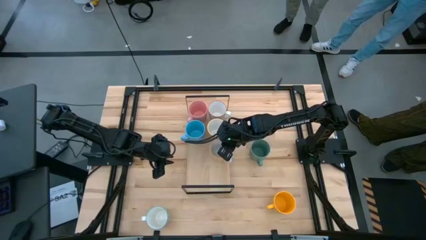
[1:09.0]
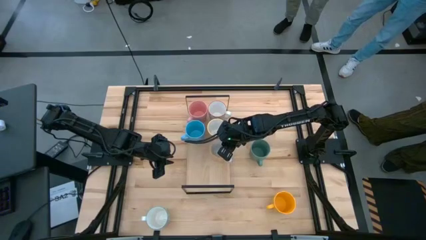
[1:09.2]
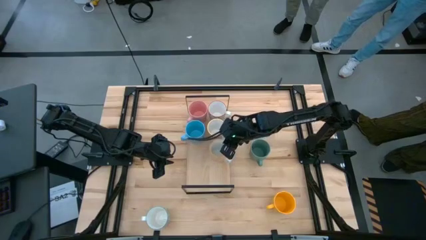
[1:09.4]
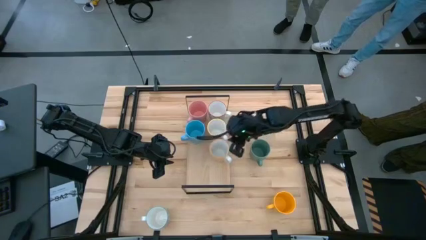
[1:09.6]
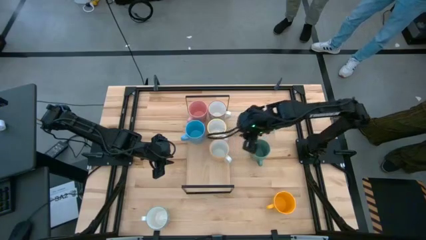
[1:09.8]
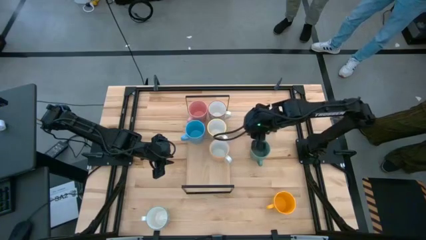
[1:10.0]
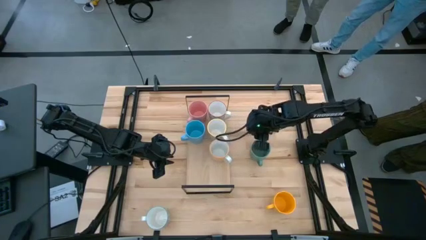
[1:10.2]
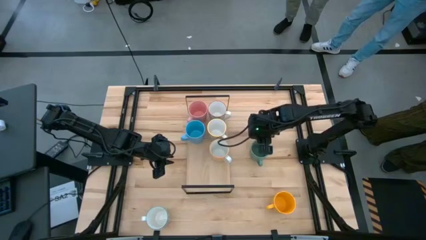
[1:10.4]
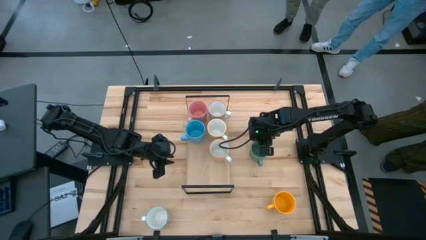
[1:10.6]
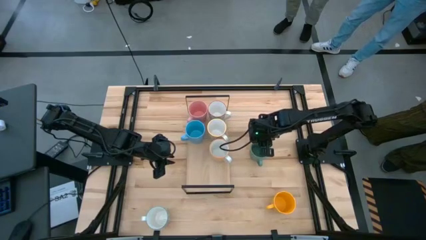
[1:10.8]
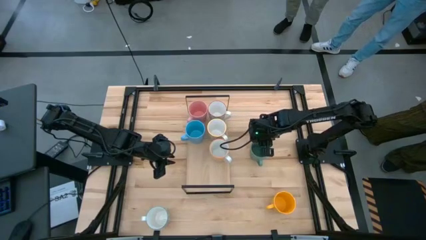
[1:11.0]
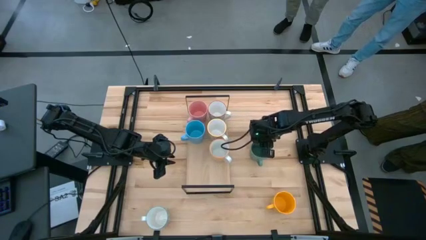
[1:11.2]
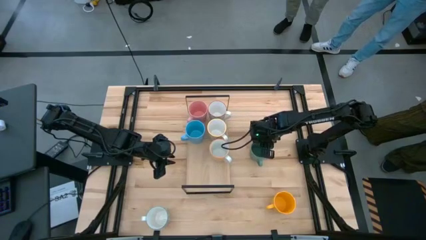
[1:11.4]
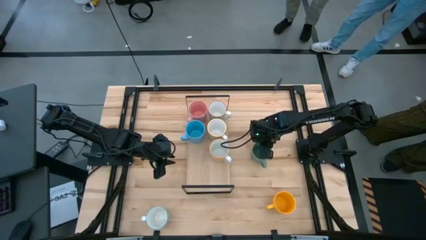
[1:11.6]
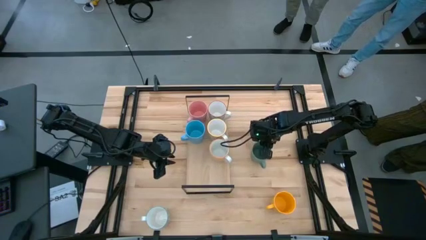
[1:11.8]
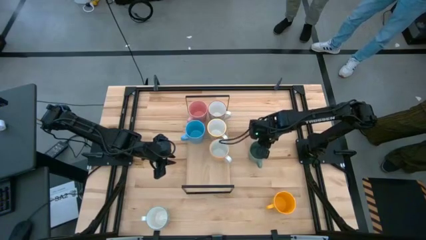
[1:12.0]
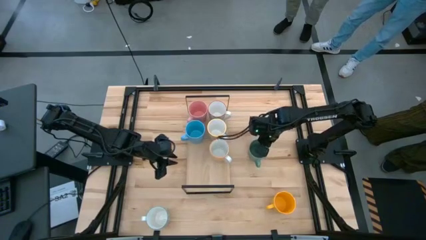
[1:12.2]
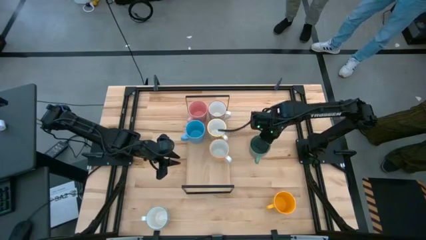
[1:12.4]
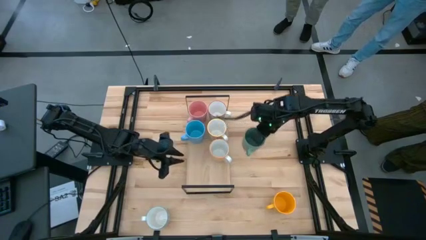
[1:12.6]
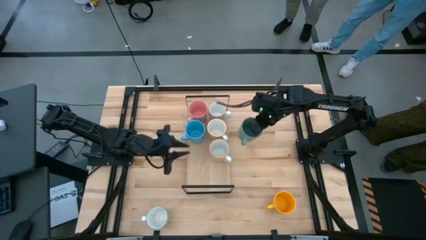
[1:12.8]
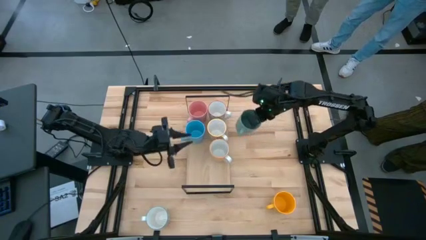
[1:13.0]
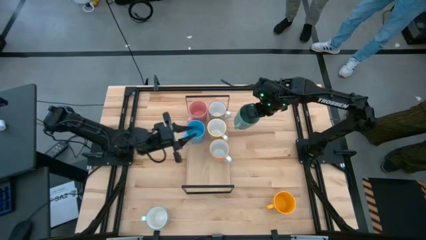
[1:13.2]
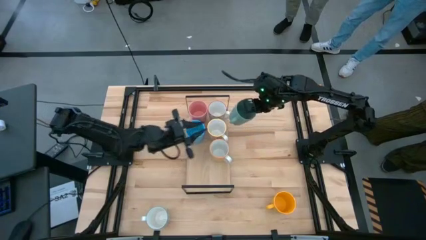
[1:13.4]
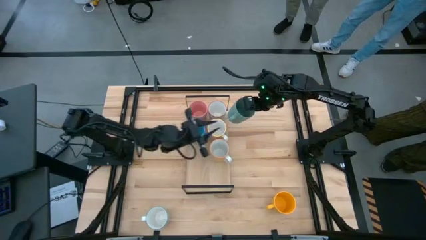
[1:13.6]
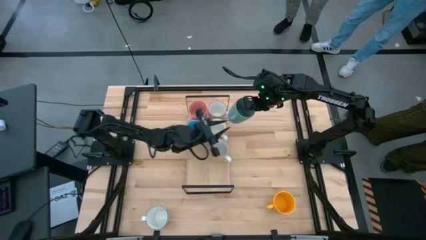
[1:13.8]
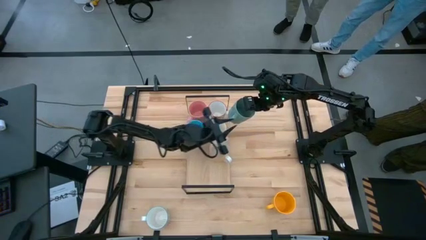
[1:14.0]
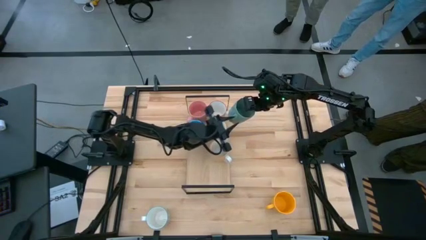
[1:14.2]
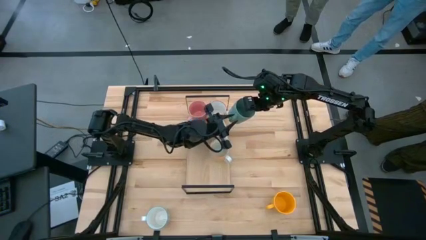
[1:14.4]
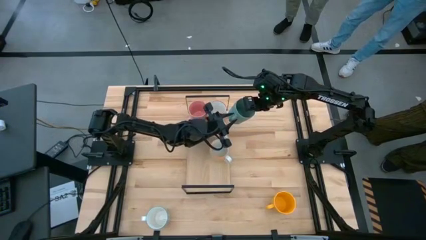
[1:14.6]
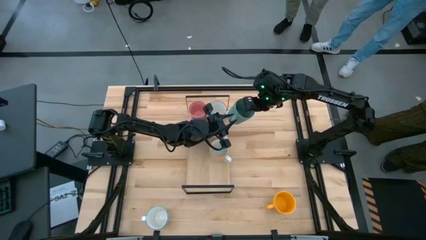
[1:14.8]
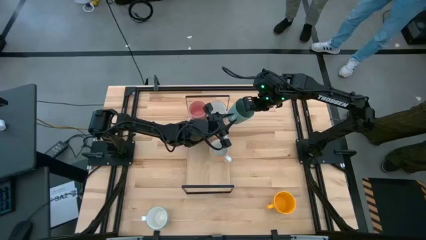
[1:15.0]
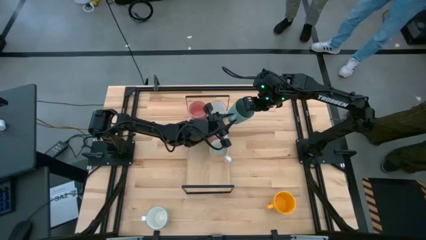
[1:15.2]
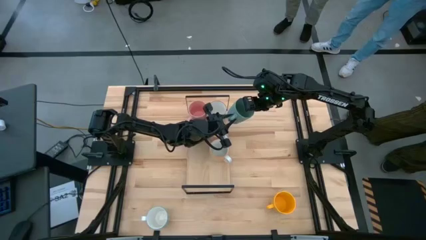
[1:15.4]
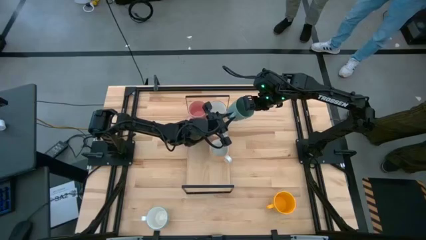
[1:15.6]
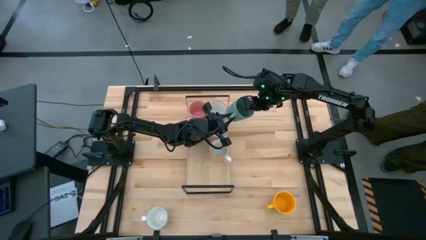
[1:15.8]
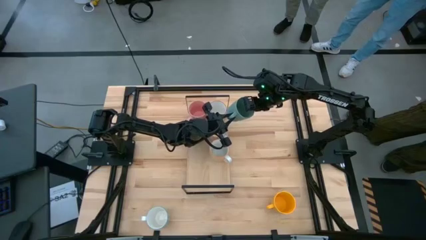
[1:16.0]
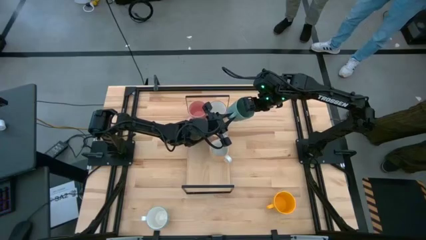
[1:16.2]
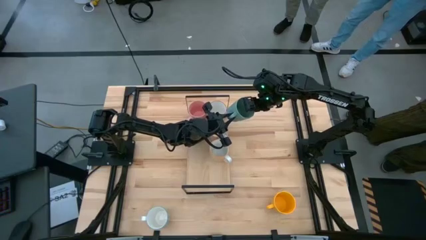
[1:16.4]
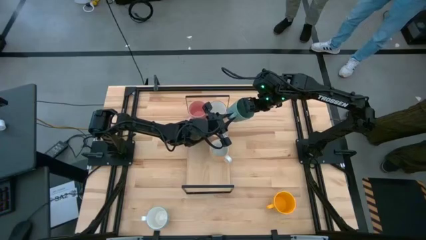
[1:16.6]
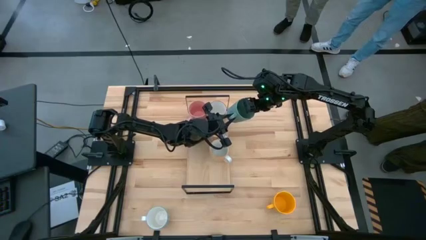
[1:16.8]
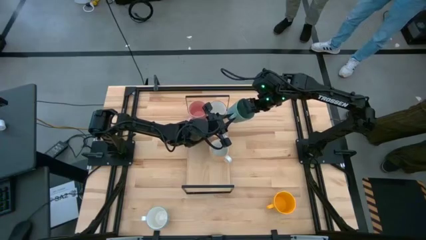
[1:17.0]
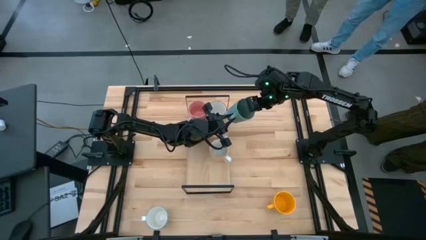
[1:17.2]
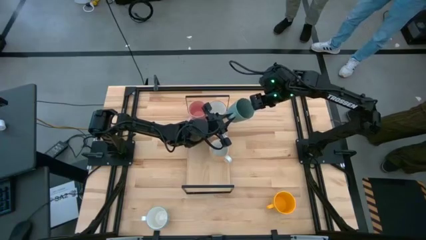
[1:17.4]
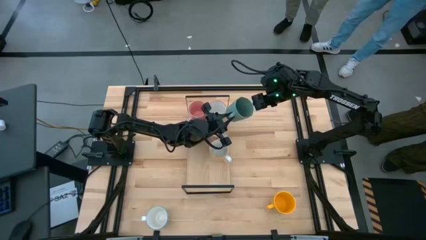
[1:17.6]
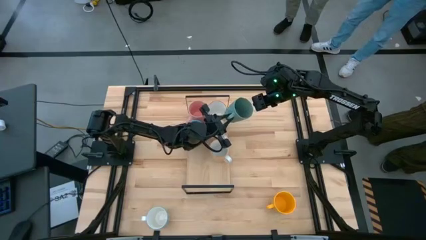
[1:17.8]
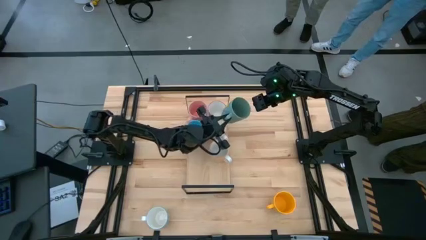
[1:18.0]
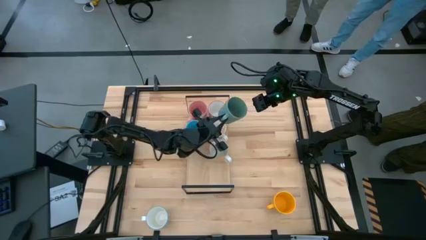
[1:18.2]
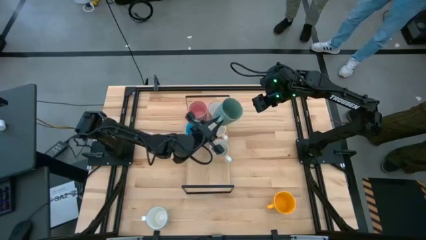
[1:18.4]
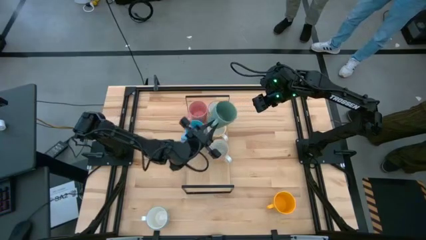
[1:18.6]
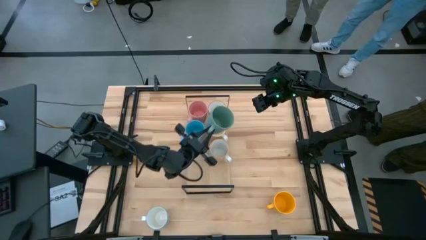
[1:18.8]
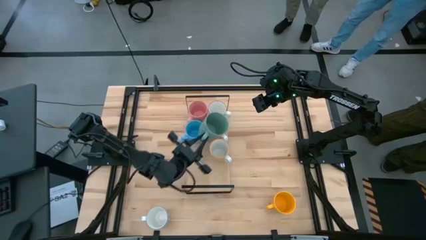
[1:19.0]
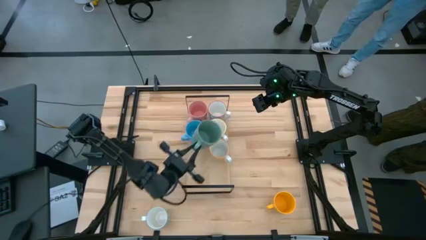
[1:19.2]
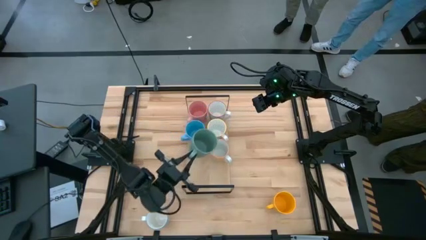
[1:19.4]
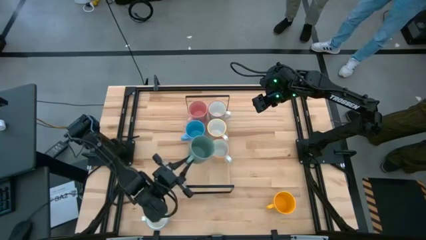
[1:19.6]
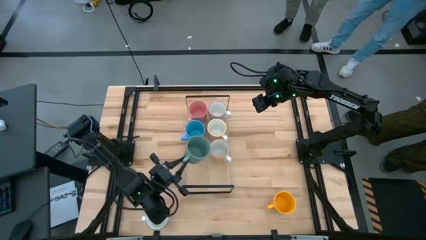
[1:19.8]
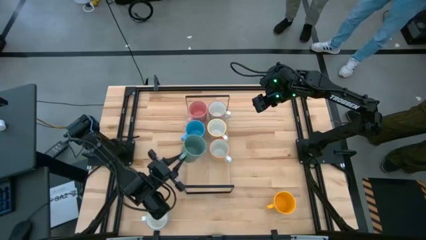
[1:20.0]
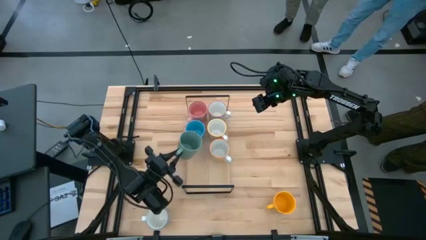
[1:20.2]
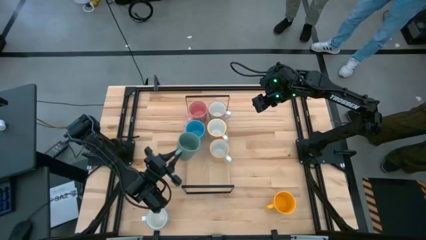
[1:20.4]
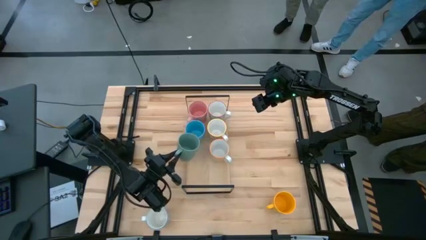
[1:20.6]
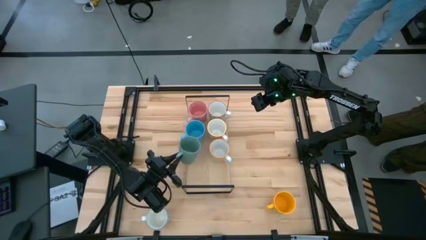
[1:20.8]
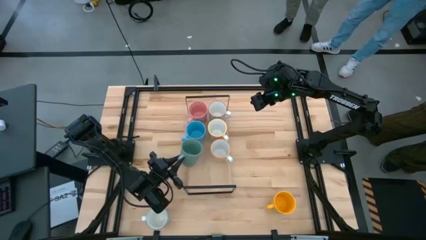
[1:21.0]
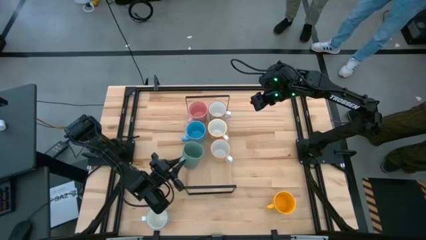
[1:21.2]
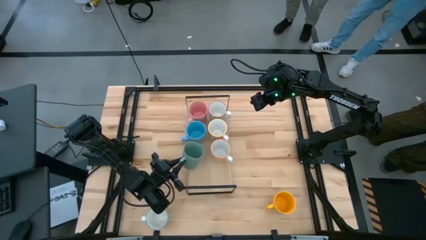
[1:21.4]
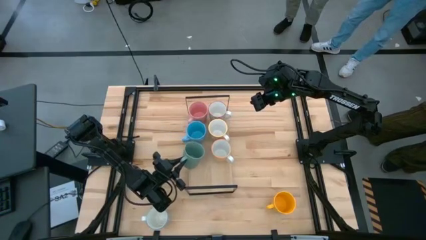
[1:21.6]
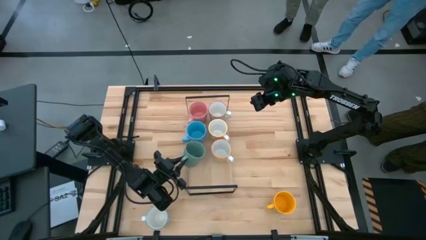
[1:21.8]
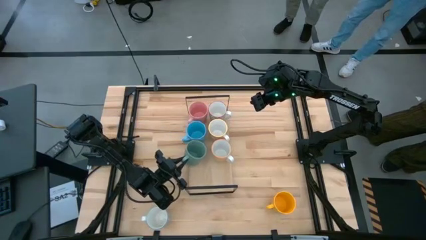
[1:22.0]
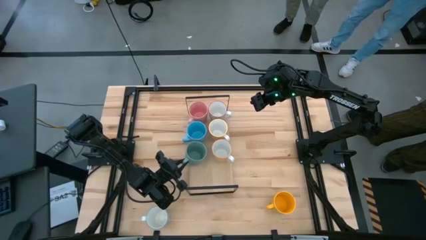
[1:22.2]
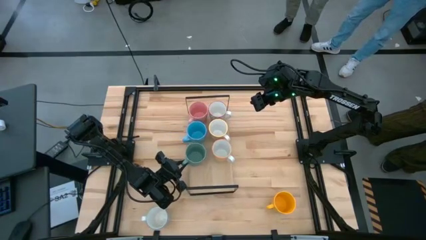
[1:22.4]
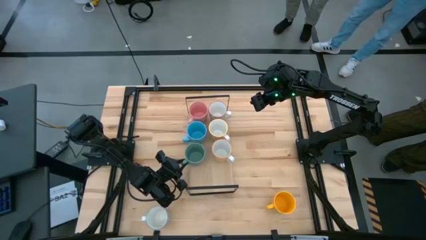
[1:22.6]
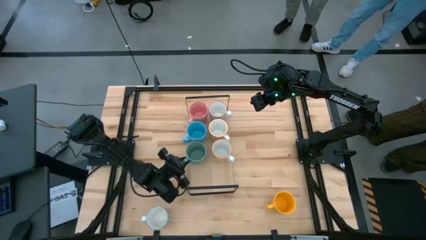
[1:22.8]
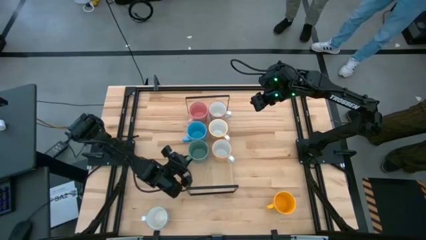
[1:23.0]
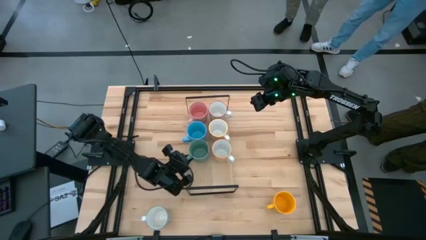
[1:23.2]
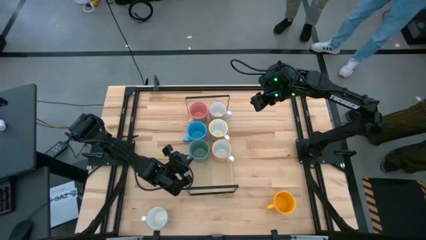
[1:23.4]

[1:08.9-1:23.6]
Task: Place coffee mugs
Put the light green mug on the shelf

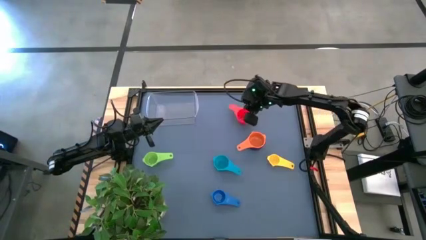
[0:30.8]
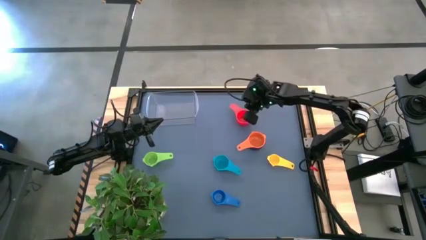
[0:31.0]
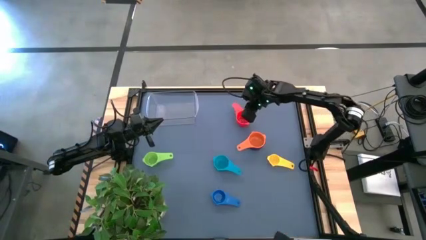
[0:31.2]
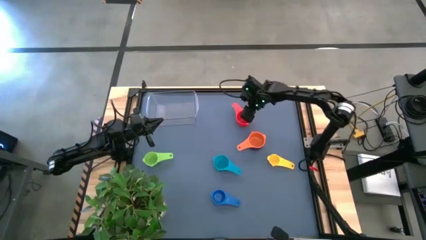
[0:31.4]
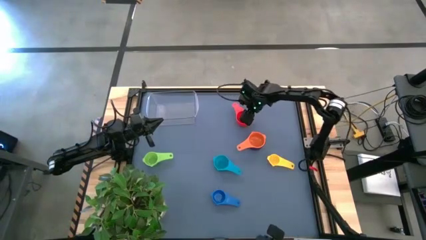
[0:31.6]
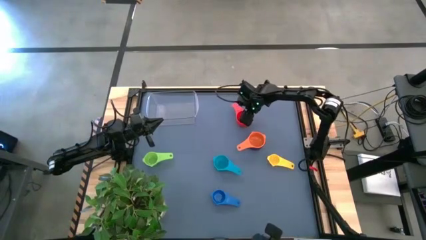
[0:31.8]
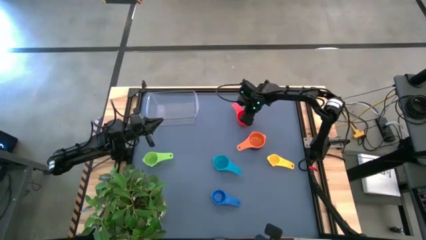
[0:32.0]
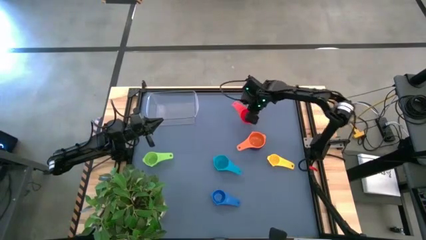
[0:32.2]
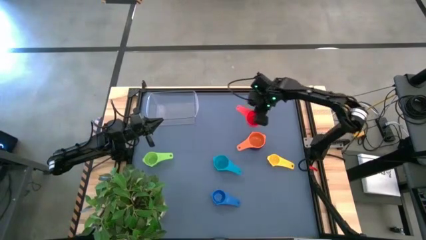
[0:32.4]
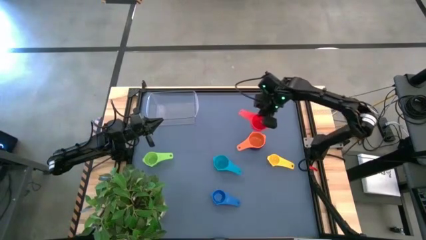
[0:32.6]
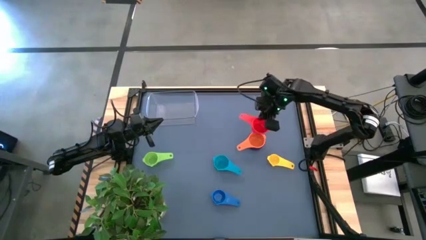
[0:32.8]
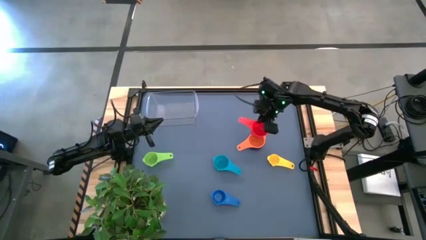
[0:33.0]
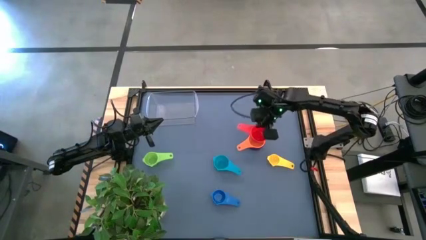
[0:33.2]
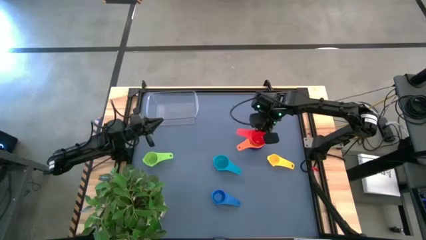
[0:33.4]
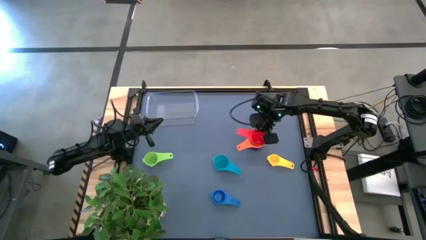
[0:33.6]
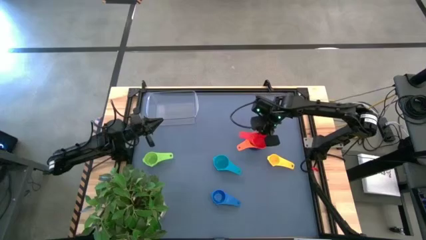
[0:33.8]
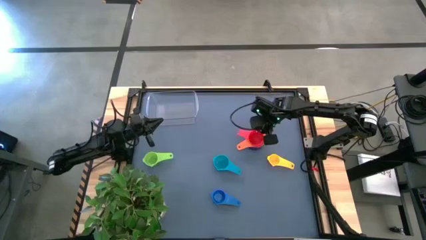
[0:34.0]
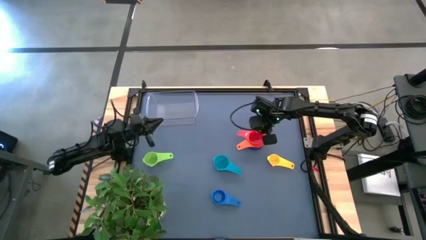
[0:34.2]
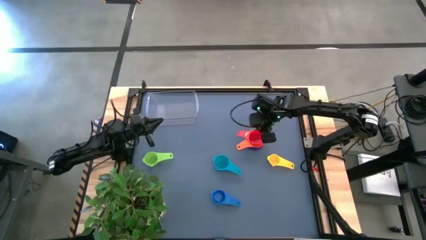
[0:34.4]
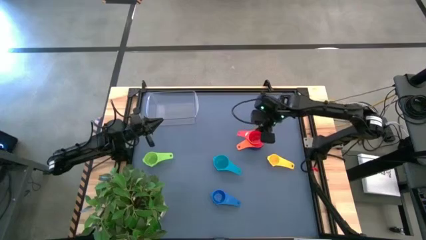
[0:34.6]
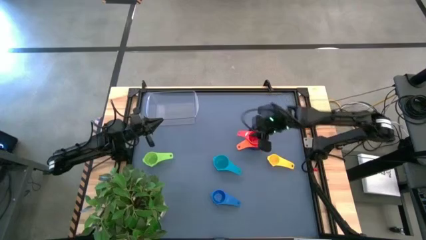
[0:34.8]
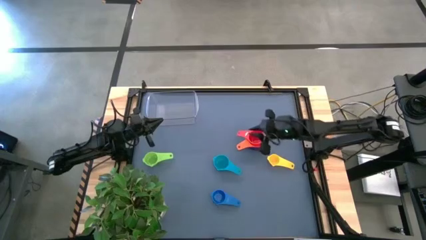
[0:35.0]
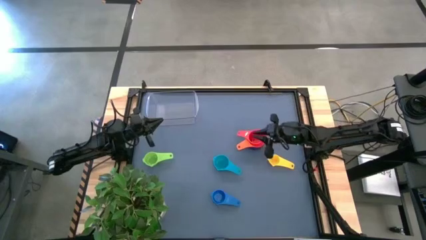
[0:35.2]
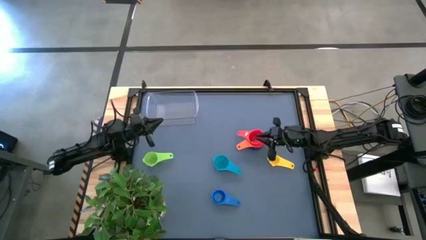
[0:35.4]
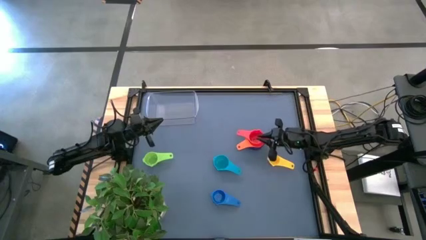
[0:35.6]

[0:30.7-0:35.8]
Task: Nest measuring cups in basket
Stack the red measuring cup on top of the orange measuring cup
